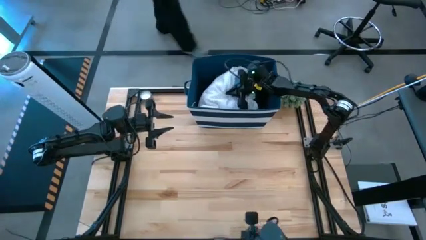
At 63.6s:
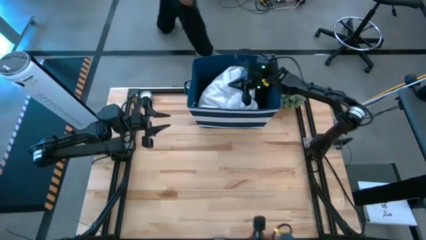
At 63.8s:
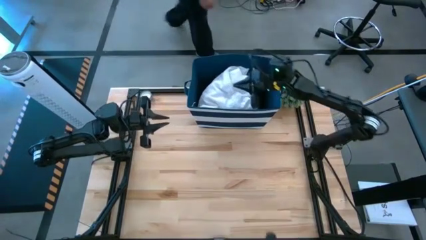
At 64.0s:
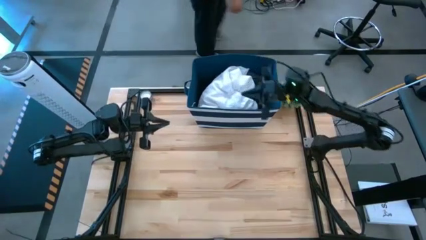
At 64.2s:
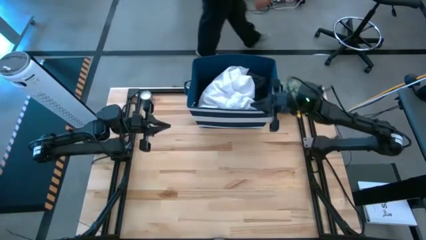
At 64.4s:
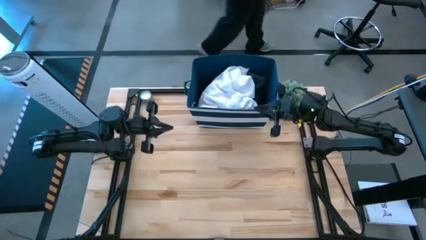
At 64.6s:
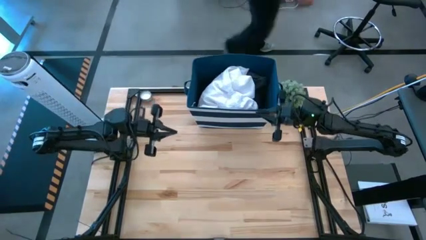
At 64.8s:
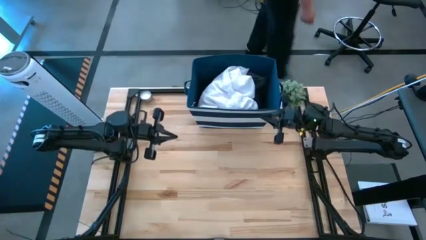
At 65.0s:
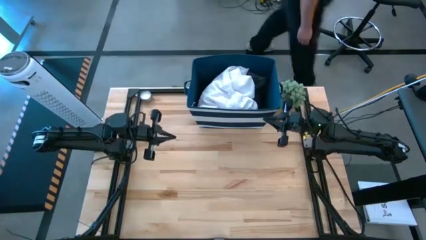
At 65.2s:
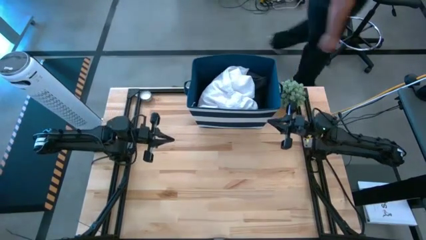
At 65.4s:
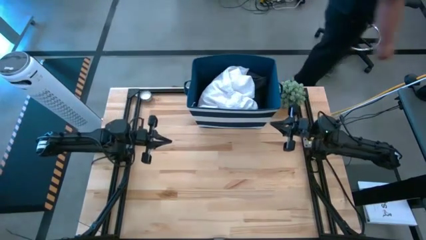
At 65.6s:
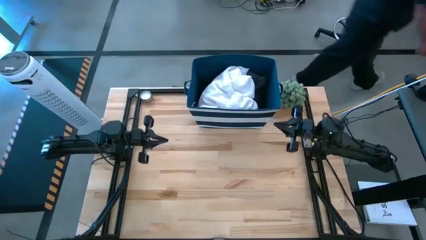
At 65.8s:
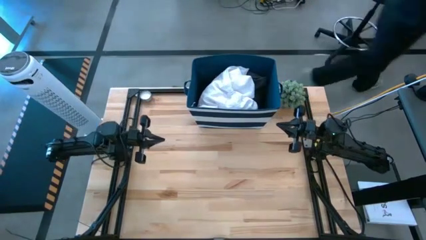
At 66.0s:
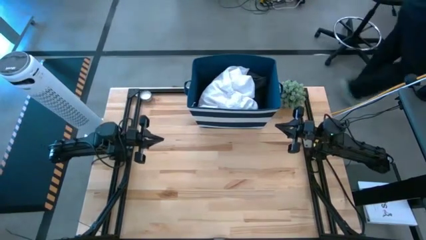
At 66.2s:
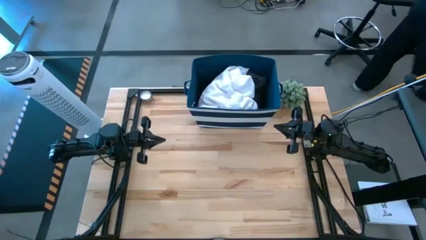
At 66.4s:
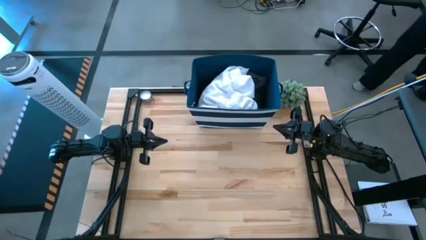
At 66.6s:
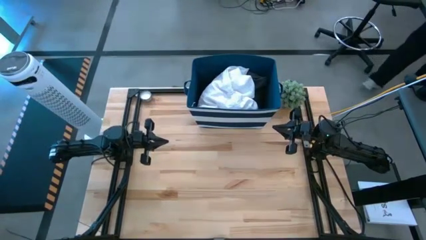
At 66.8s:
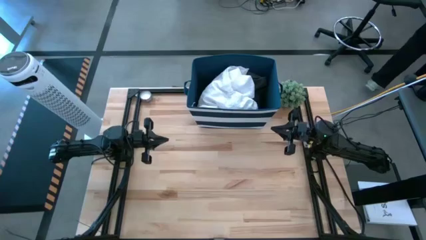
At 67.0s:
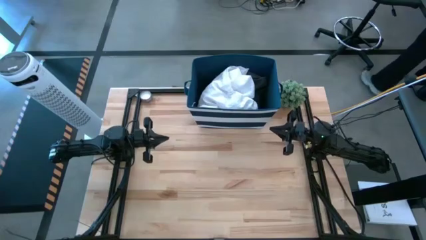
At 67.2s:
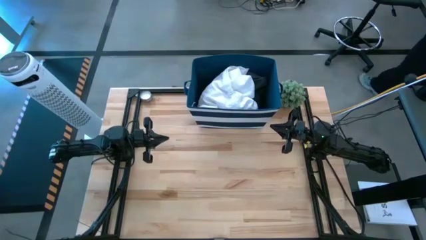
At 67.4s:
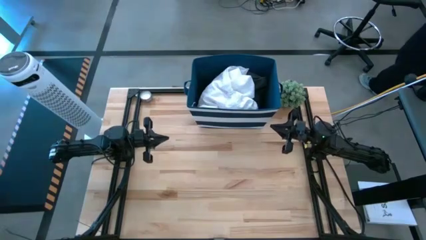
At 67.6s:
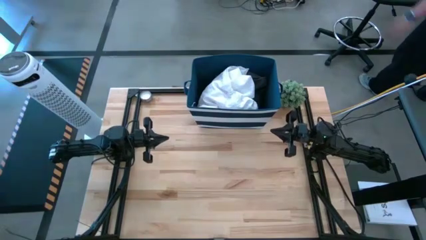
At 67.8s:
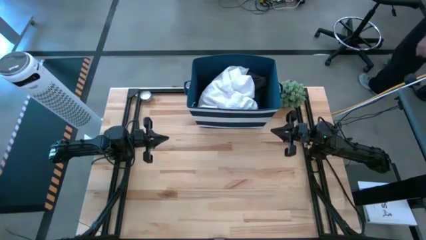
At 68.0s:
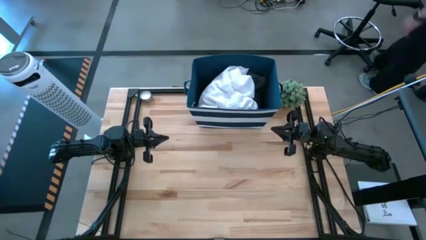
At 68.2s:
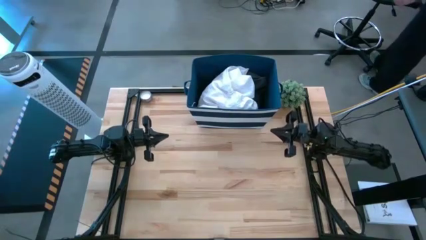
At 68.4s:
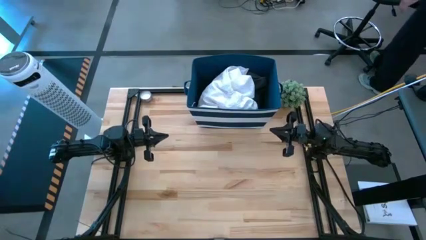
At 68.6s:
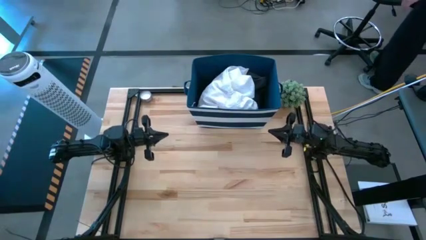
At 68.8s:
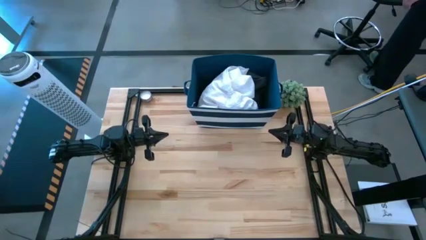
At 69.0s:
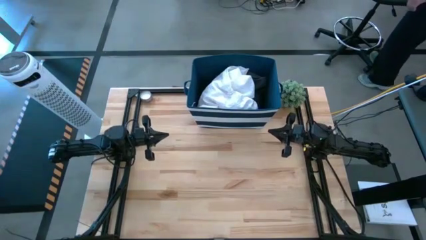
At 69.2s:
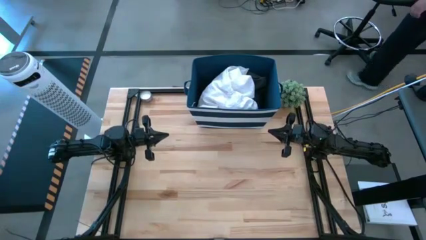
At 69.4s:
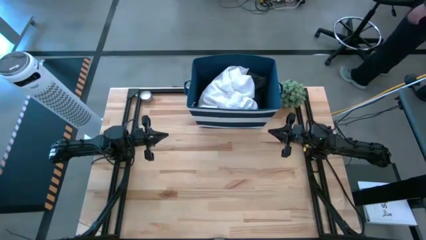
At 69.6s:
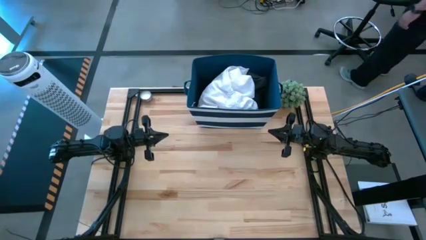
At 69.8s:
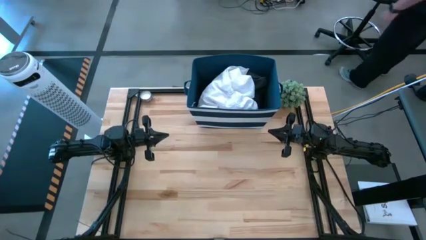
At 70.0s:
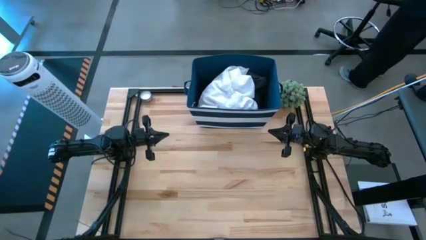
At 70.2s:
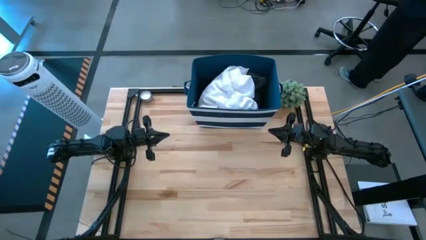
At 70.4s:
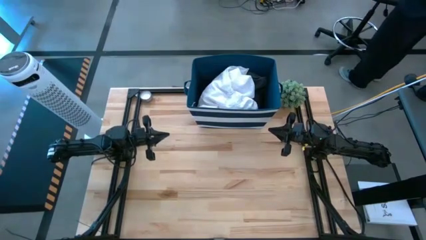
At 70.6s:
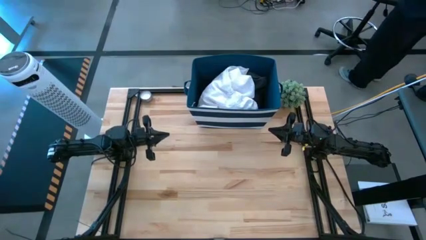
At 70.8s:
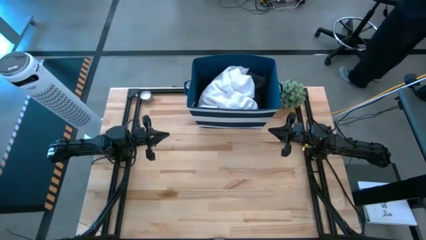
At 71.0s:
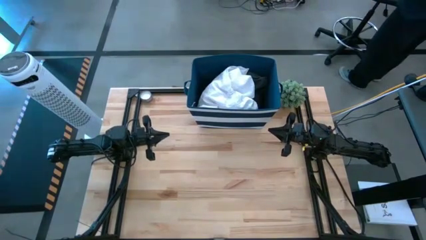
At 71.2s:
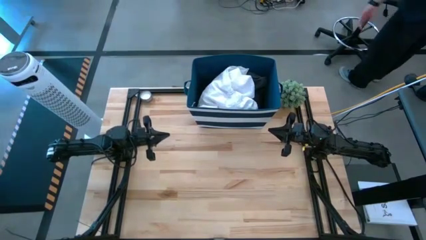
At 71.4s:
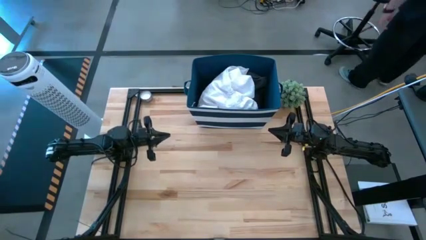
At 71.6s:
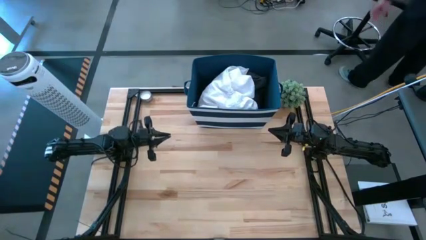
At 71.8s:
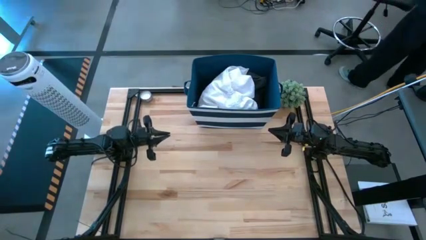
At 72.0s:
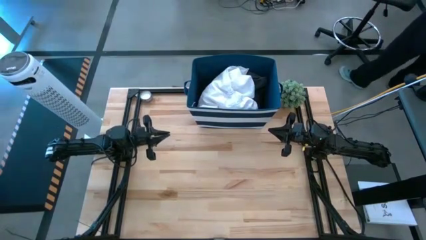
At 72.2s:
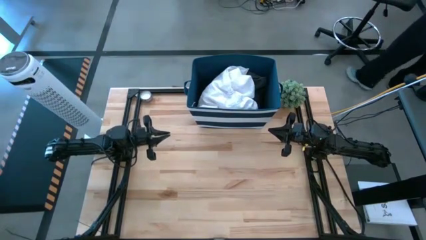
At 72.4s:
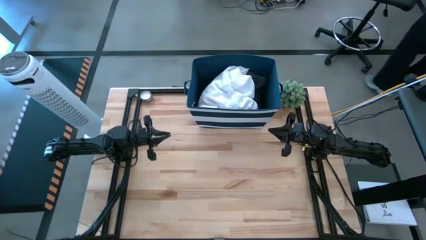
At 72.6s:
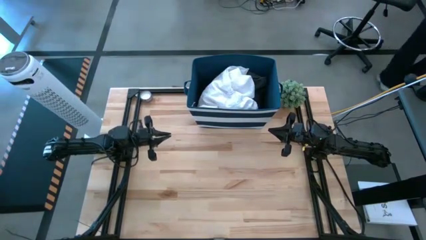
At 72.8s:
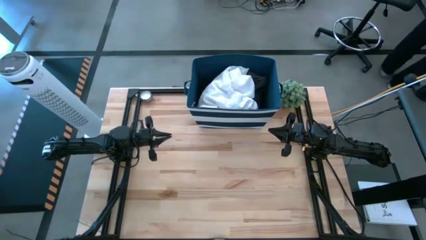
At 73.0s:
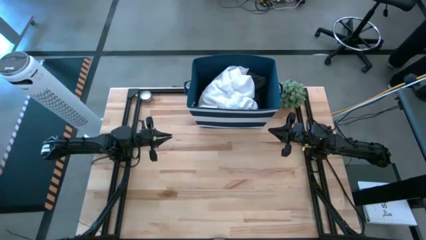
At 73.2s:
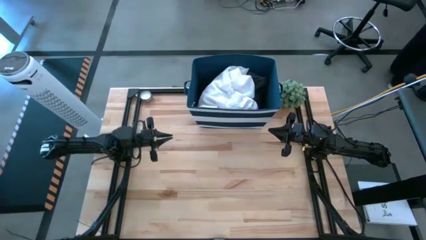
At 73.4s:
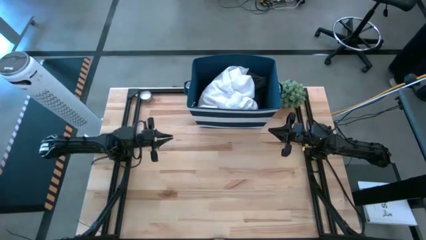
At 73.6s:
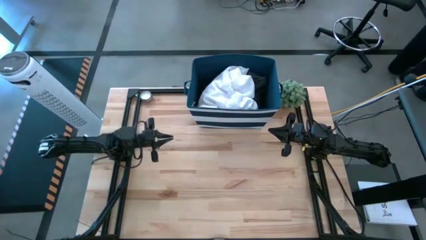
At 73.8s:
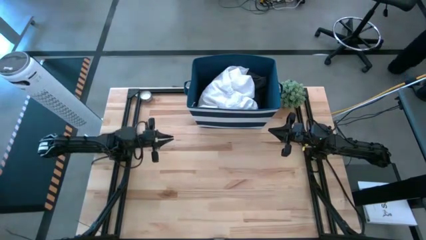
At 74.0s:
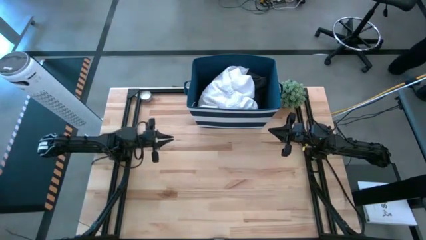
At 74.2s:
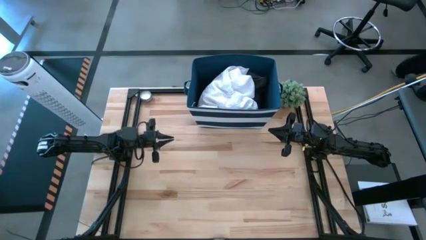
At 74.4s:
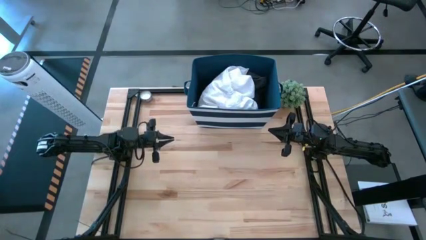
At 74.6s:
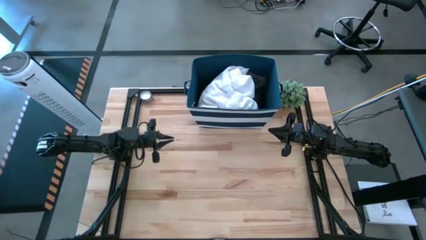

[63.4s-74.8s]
Task: Sort clothes
Return to Home Position

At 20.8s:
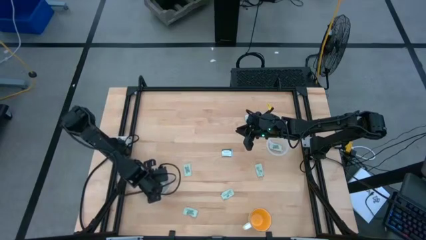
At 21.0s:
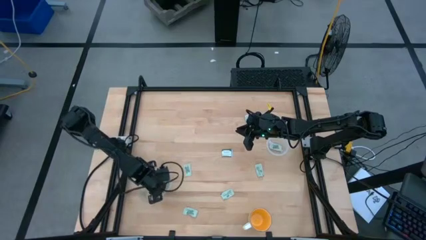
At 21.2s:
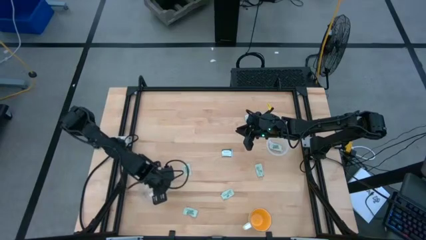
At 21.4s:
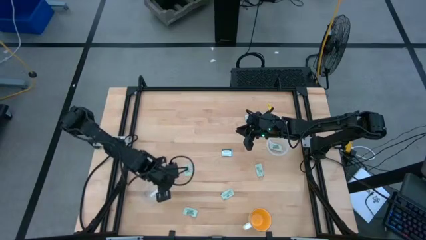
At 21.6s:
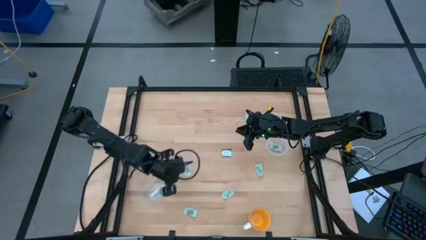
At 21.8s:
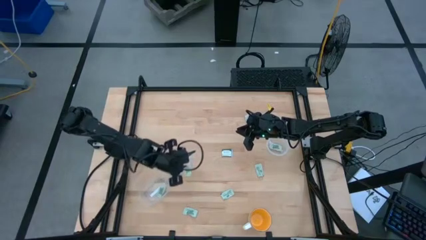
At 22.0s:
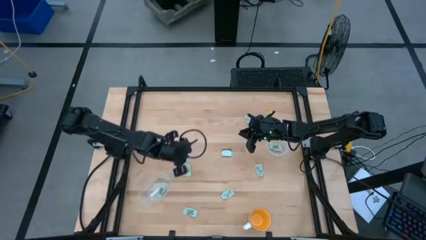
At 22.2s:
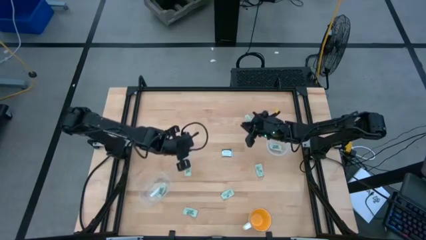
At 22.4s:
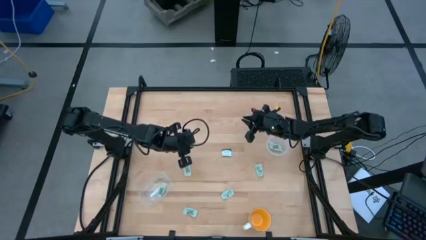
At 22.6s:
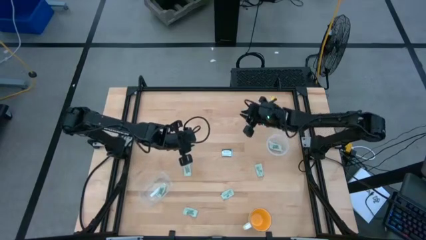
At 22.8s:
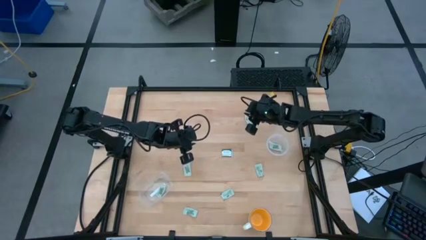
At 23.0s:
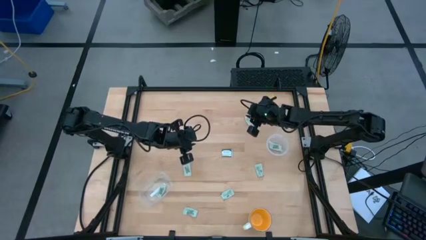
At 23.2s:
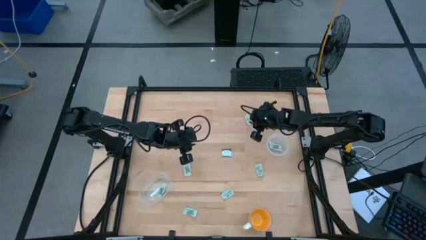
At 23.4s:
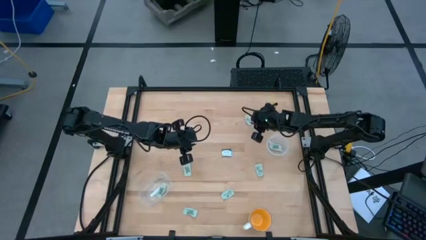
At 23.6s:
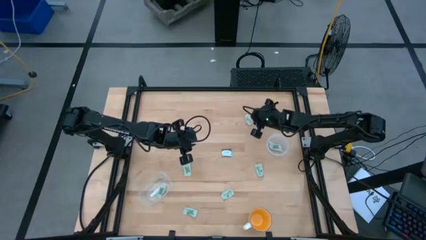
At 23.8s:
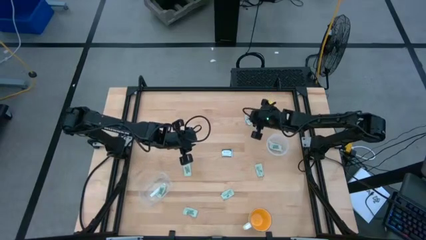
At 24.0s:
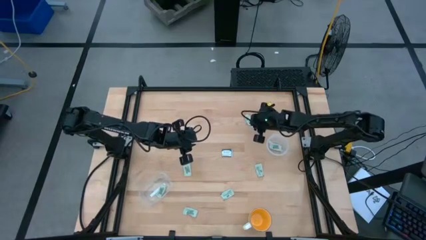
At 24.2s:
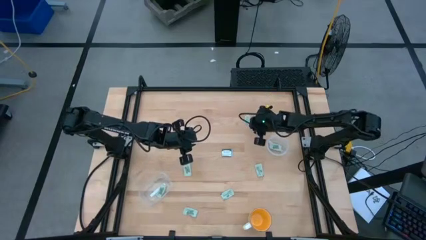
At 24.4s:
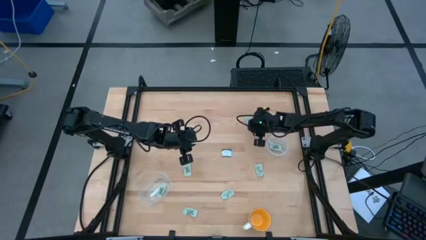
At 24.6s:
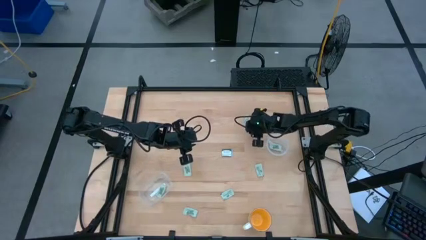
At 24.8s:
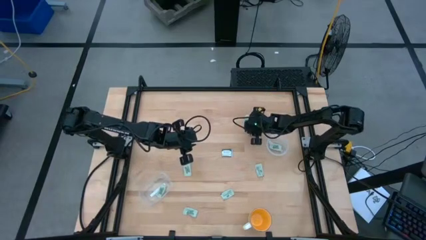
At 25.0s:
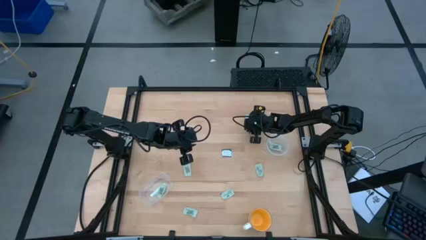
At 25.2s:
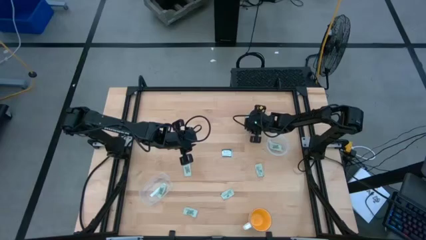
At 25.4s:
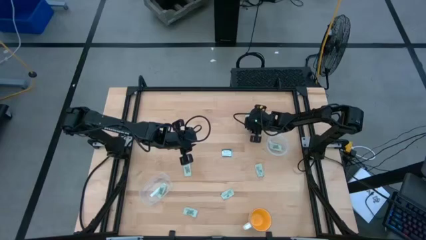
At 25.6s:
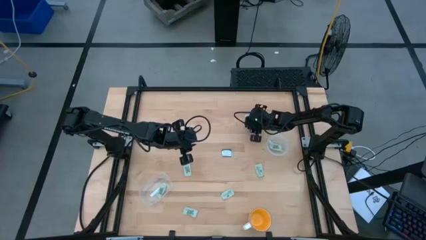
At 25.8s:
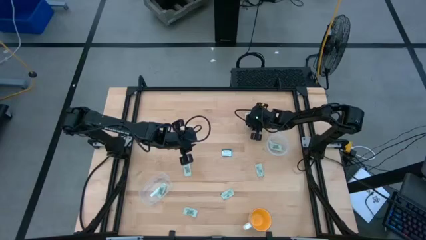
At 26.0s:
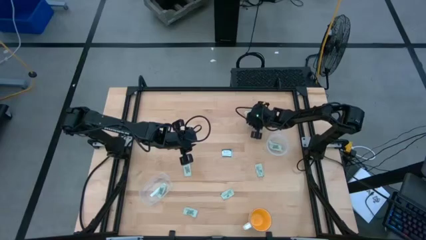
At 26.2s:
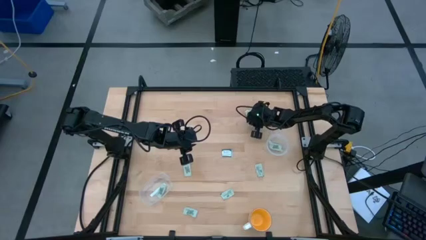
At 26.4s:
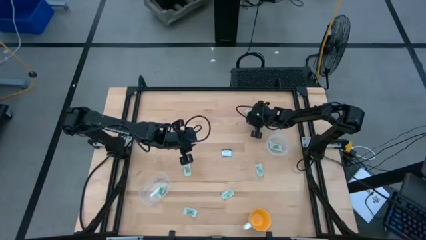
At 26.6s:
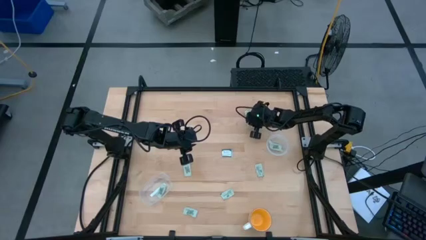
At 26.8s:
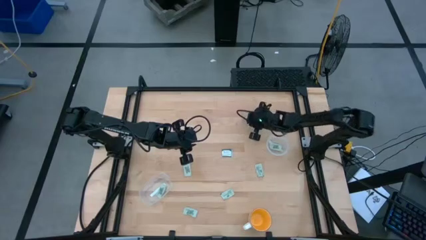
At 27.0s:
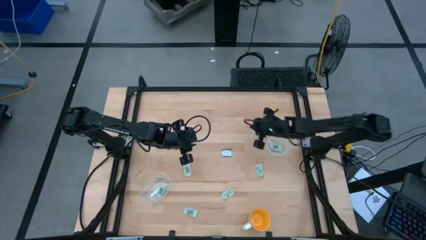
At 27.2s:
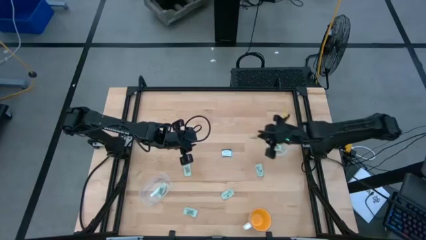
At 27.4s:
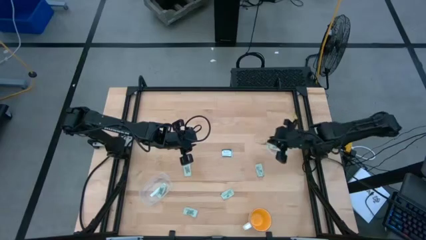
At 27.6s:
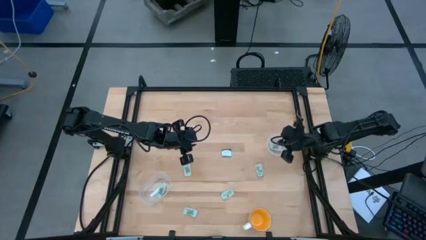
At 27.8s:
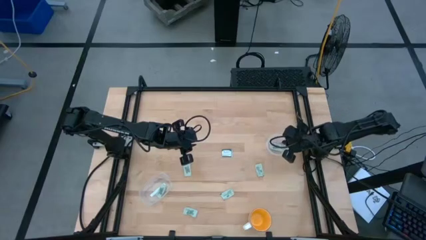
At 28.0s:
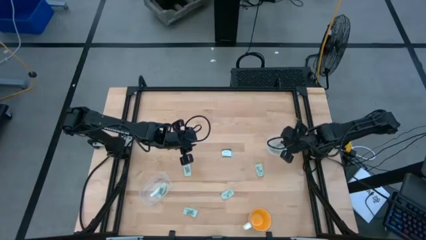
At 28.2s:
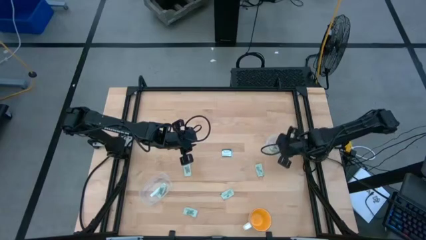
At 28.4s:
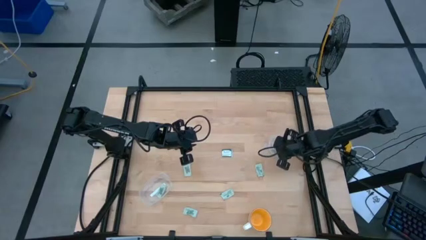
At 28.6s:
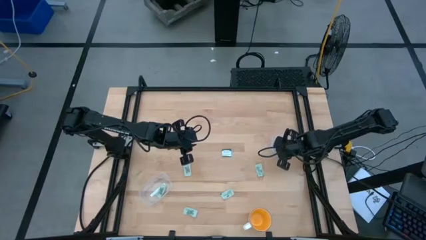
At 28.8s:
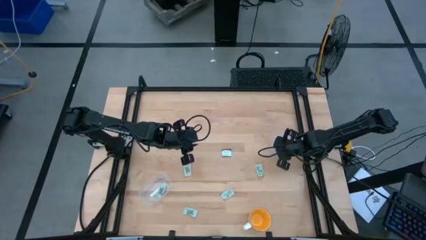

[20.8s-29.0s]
Task: Pick and place Stevia / Truvia into bins
Put the white stevia packet into the circle transparent container
